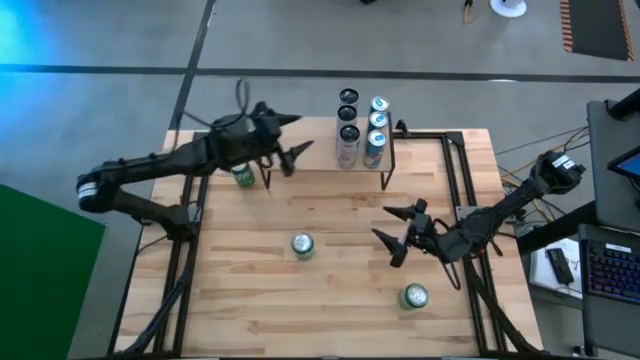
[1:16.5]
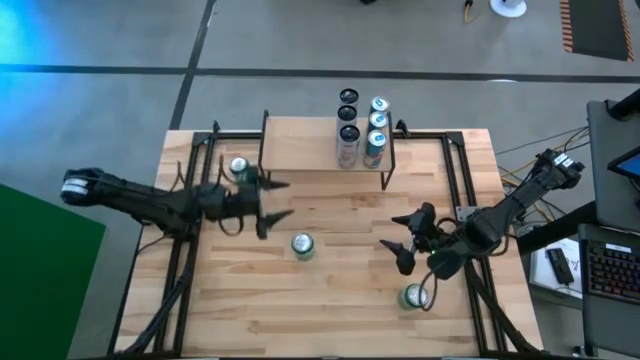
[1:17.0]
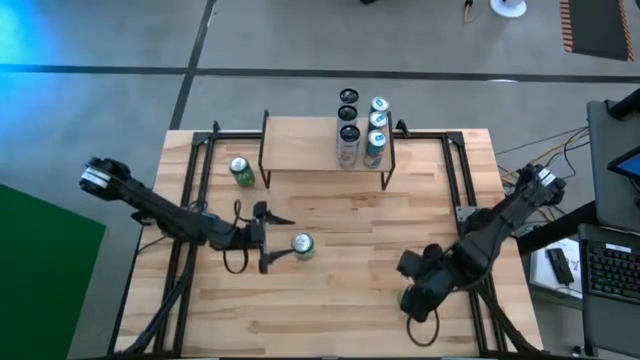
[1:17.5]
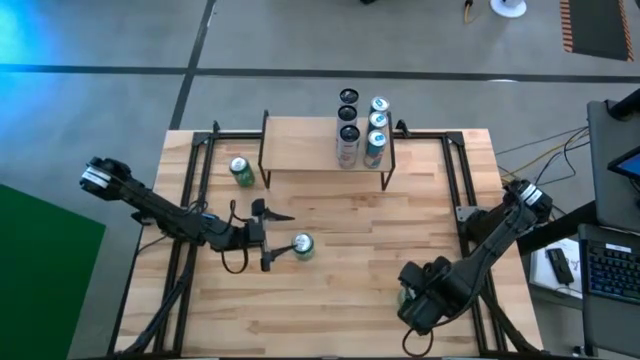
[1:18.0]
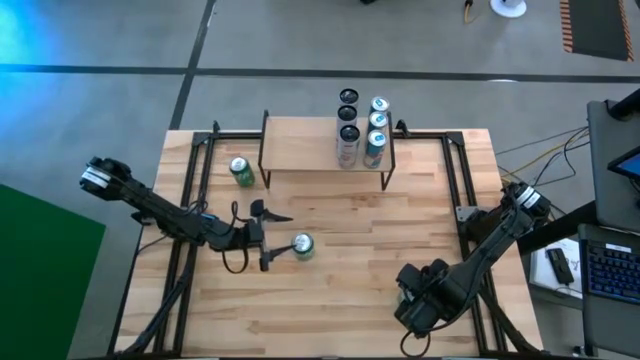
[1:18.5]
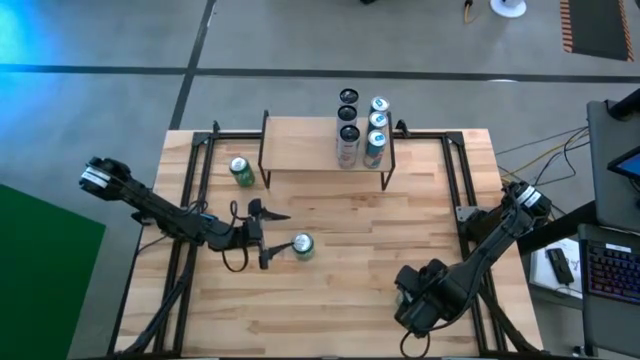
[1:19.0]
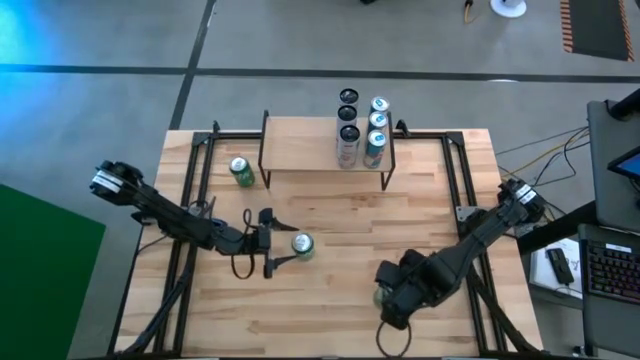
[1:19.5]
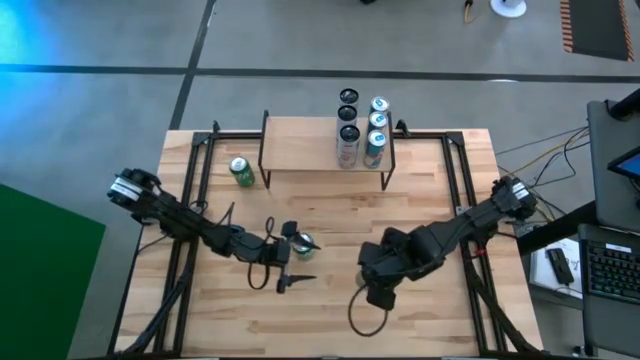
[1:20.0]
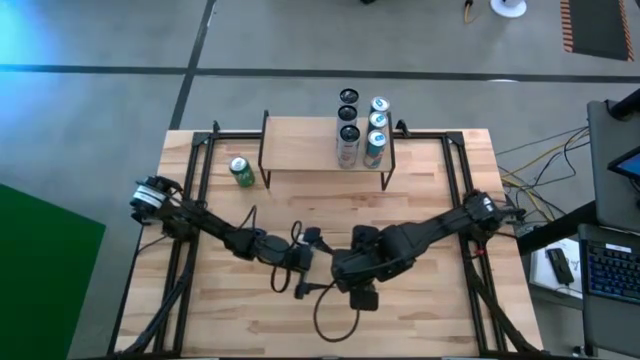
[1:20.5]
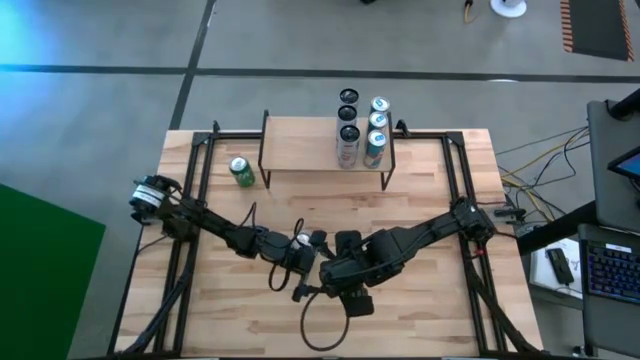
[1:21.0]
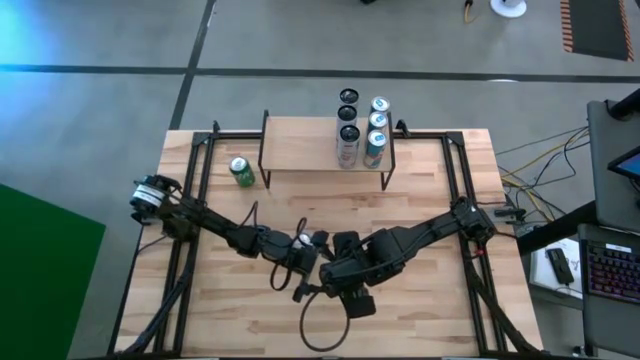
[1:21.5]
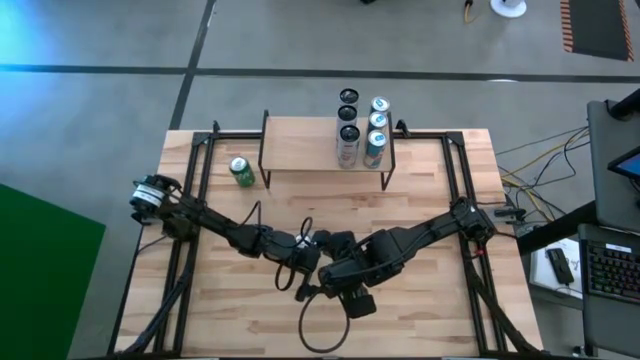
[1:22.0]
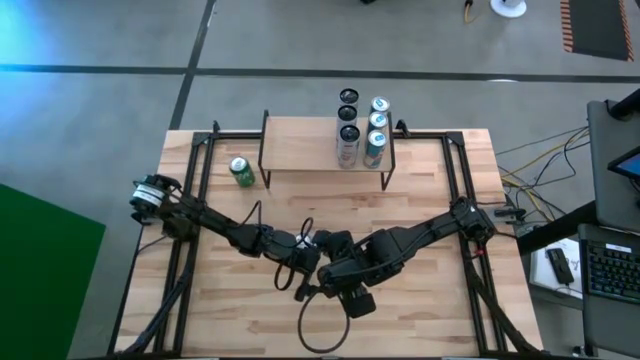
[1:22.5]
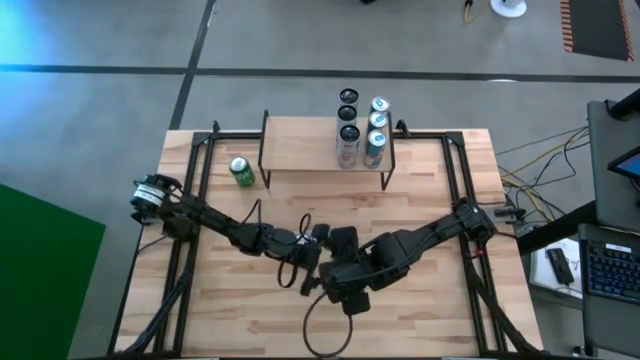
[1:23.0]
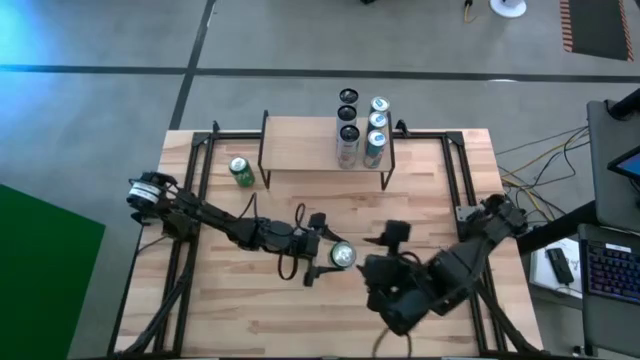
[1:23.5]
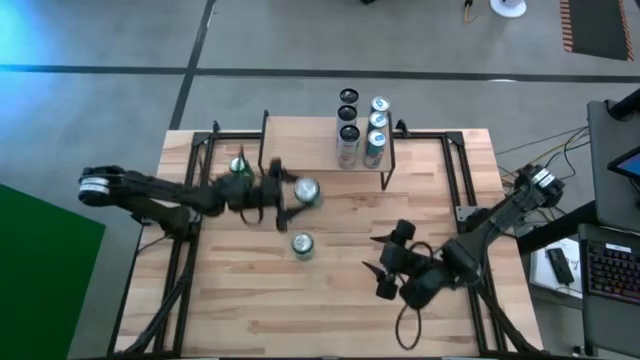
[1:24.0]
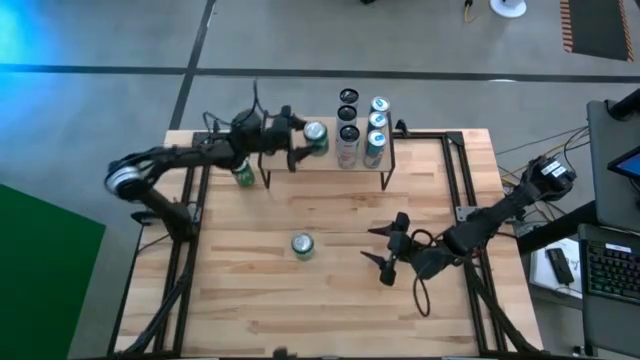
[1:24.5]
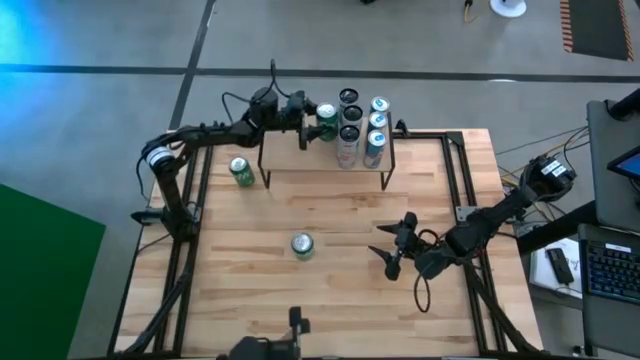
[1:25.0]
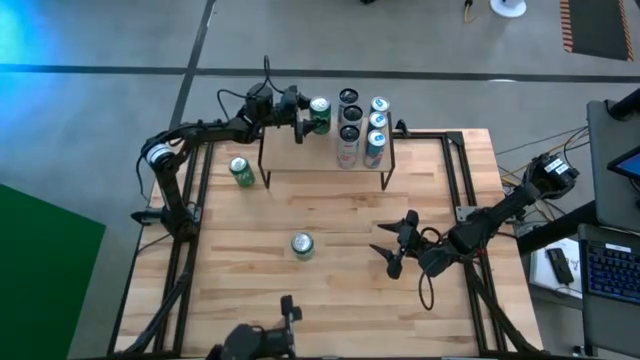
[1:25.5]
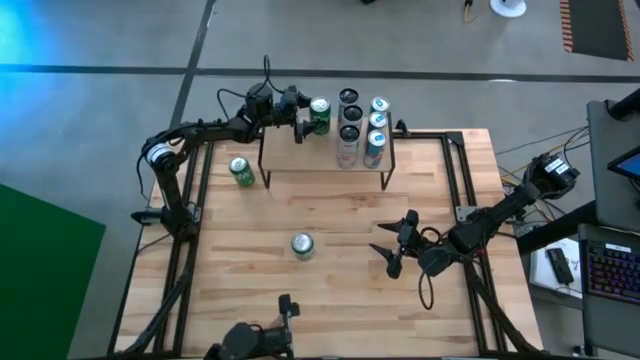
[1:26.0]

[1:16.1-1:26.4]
Task: Sort soda cans
Put the bottom green soda can on the shelf

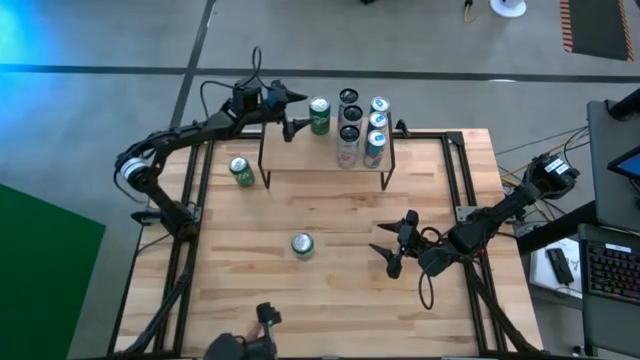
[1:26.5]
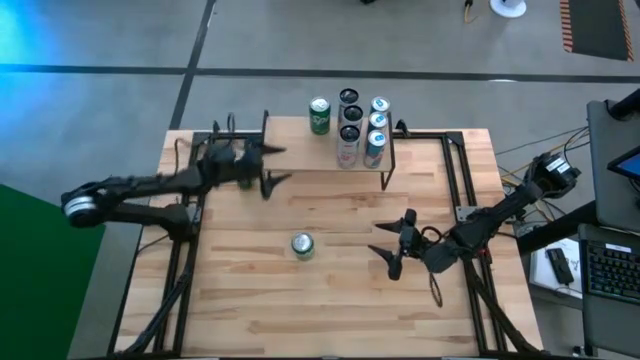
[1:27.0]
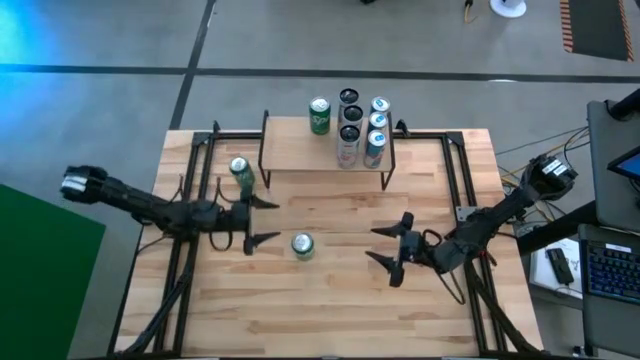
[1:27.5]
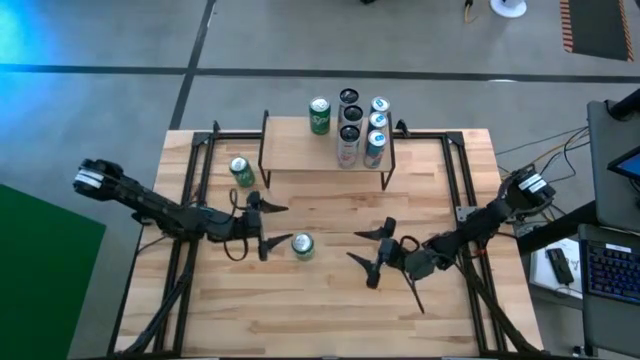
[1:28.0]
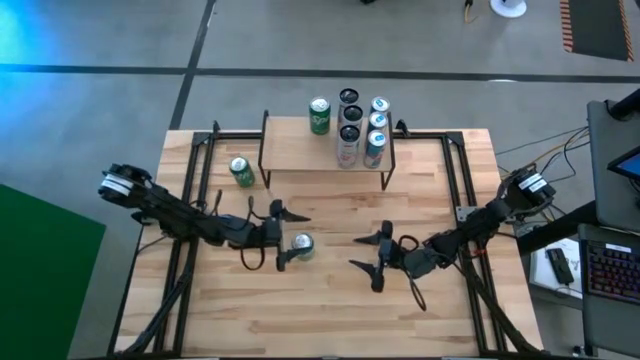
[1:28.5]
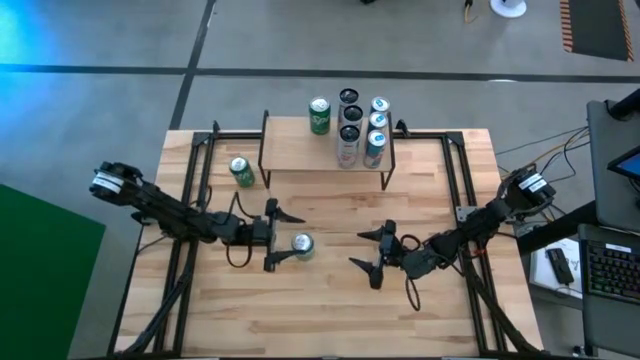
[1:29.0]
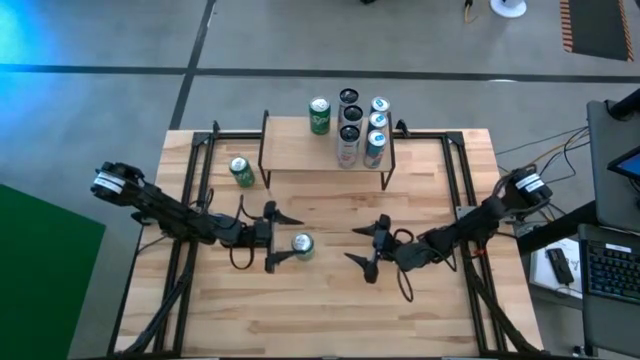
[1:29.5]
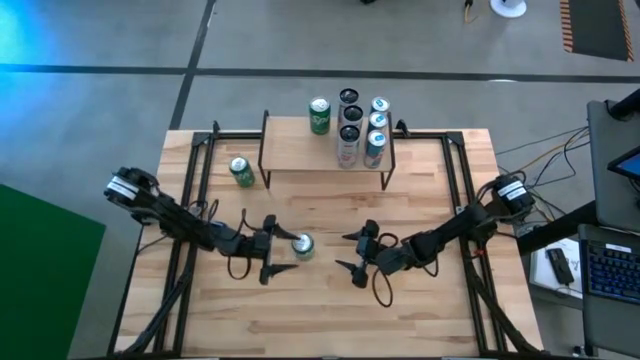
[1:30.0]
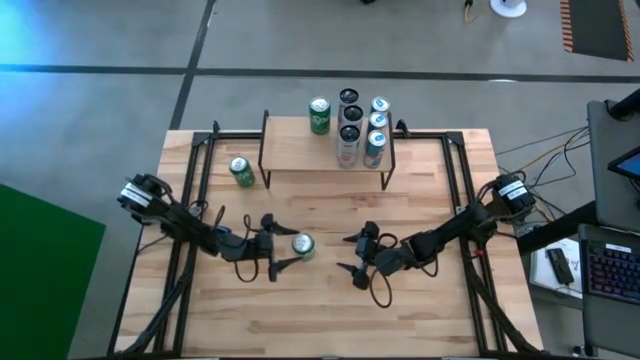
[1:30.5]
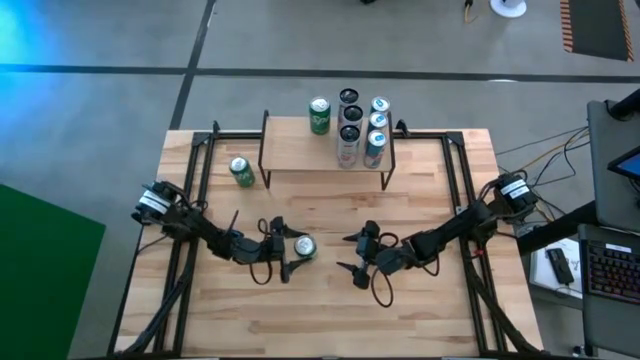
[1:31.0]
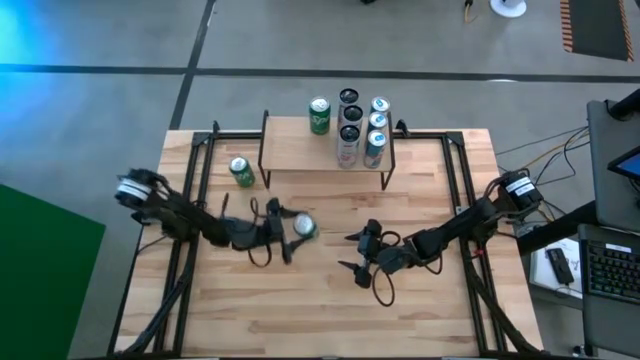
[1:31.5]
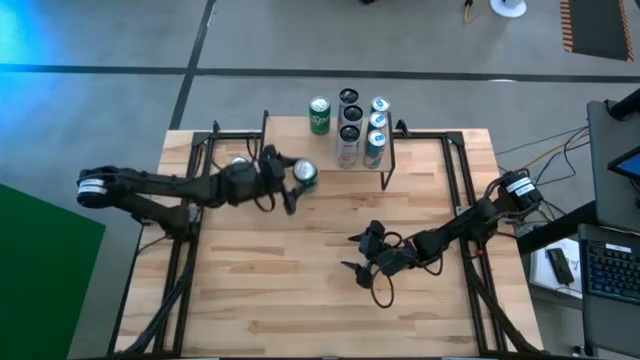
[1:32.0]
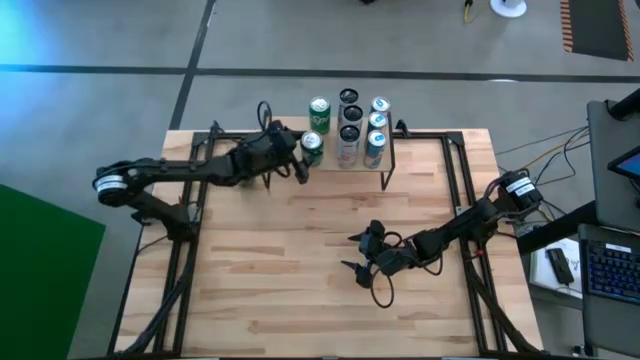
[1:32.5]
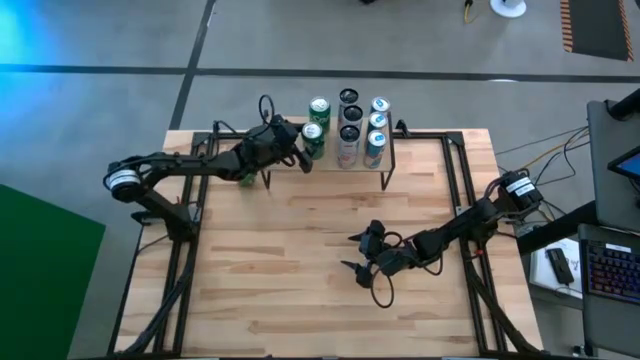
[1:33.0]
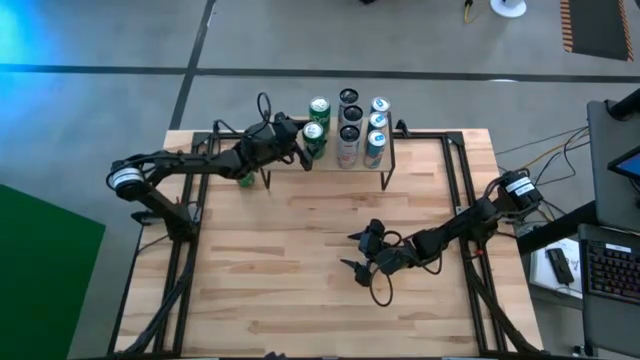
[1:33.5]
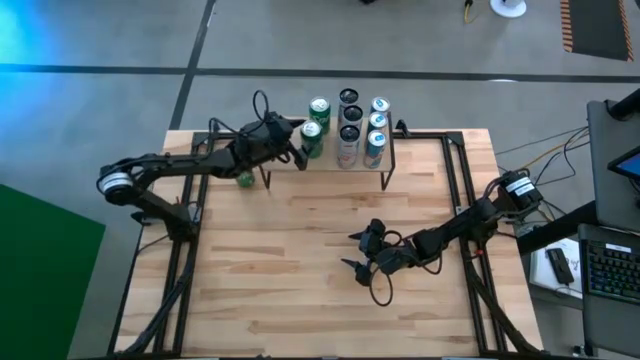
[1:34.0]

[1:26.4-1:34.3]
Put the bottom green soda can on the shelf and align it with other green soda can

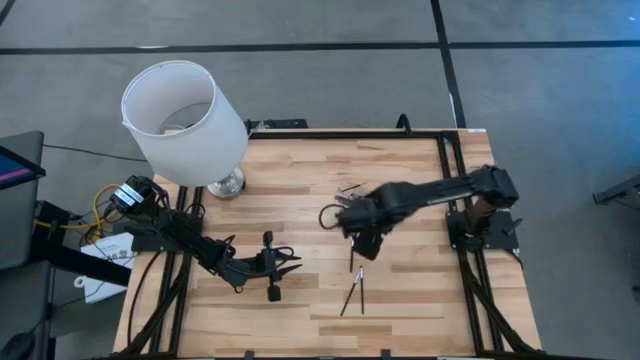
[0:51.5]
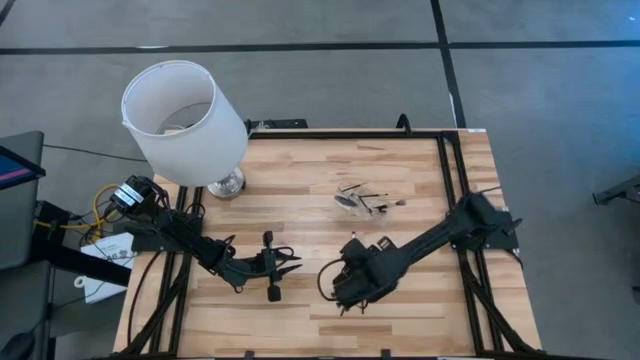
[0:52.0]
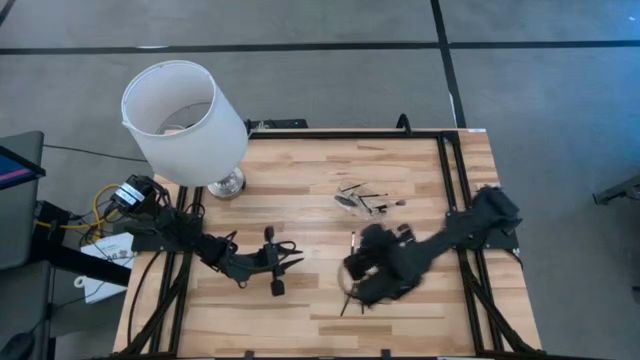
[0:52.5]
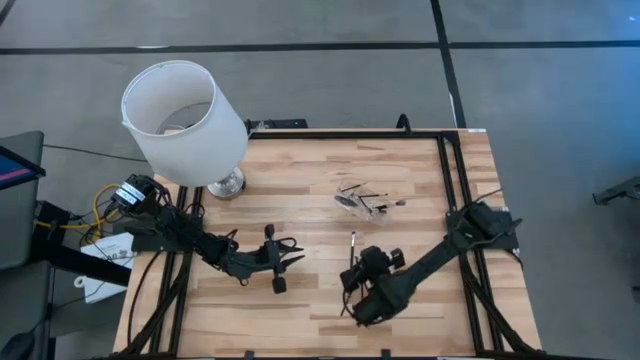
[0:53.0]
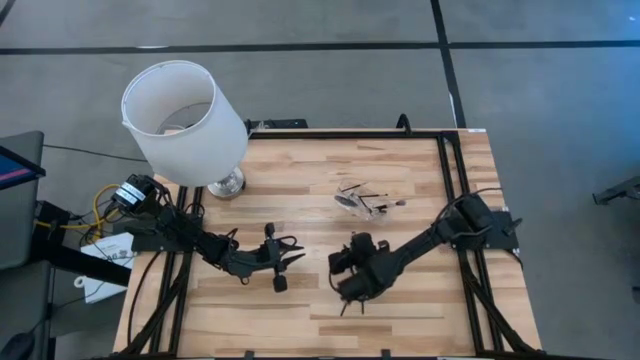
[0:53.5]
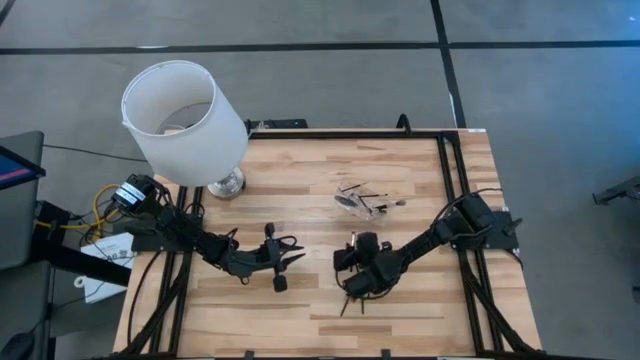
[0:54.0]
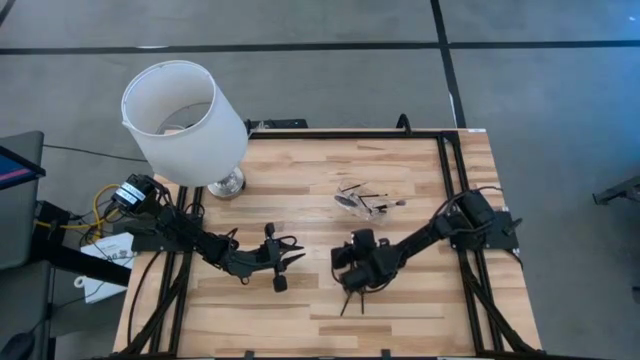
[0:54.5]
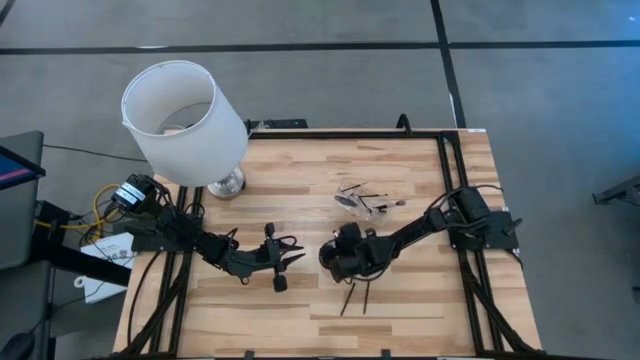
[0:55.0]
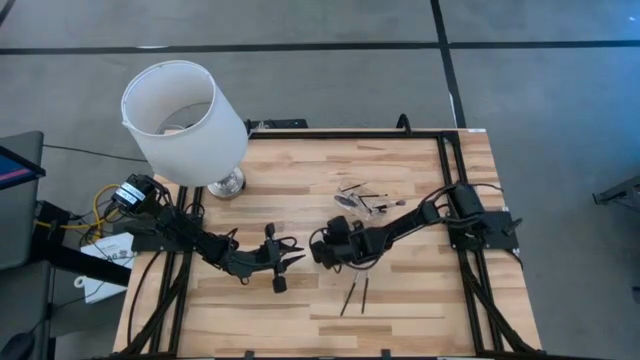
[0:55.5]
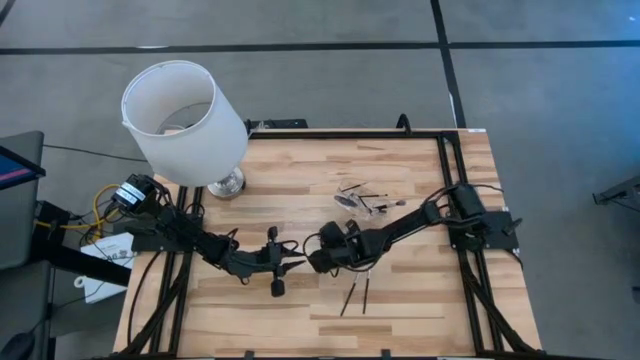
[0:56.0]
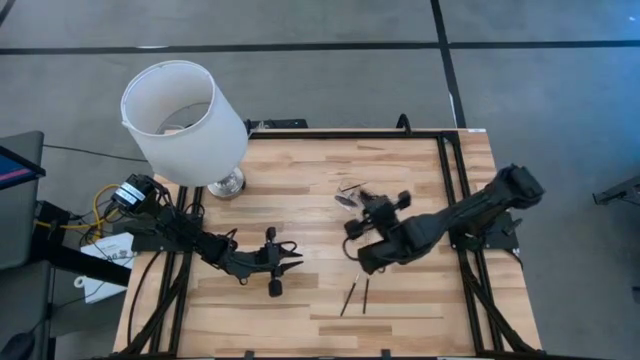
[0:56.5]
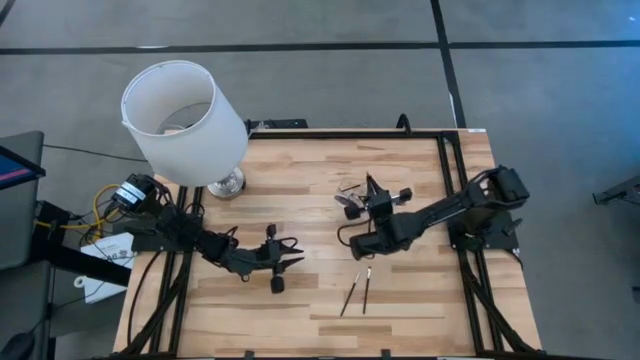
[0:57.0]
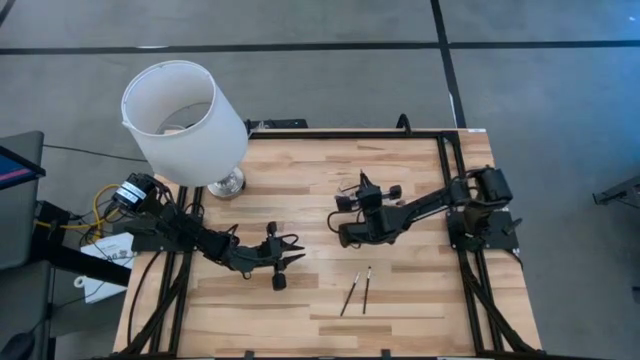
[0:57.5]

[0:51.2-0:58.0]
Task: Put items in baskets/containers
Put the black eyeshadow brush into the transparent organizer
